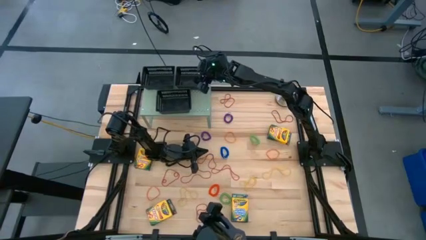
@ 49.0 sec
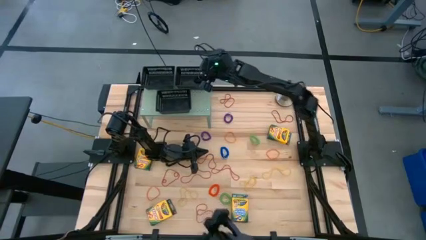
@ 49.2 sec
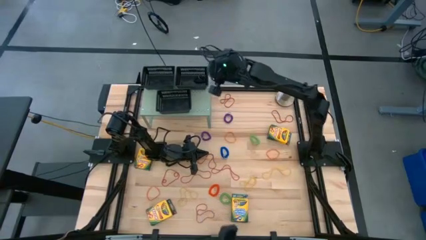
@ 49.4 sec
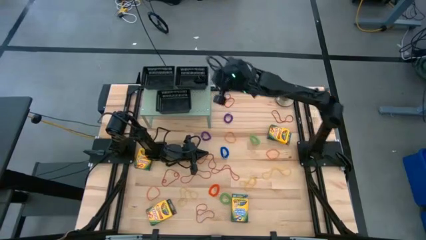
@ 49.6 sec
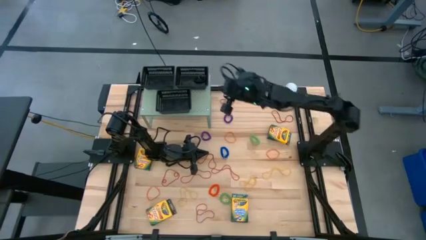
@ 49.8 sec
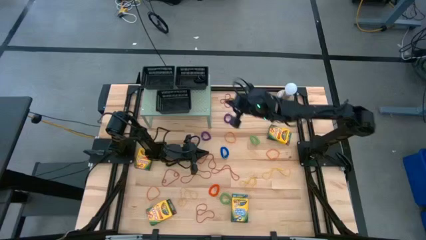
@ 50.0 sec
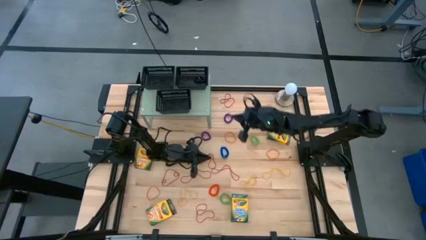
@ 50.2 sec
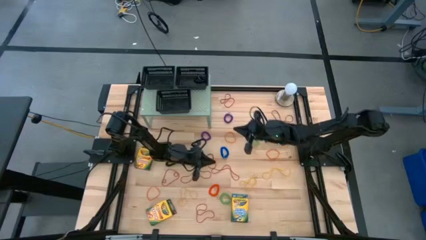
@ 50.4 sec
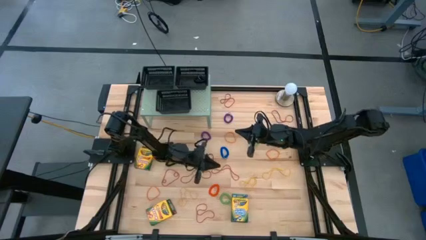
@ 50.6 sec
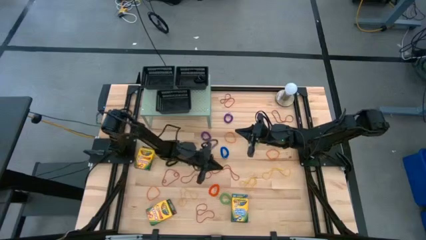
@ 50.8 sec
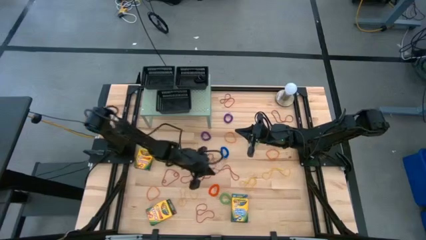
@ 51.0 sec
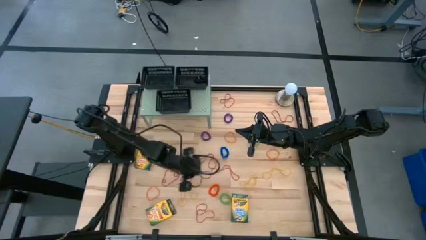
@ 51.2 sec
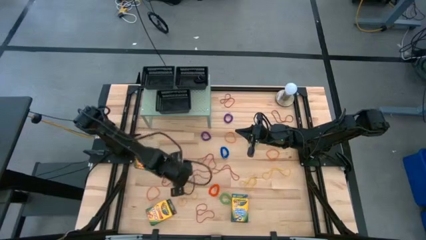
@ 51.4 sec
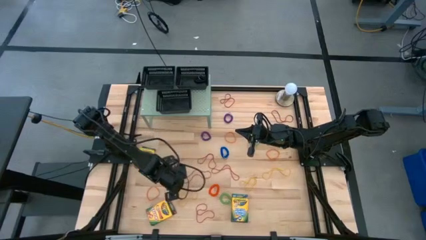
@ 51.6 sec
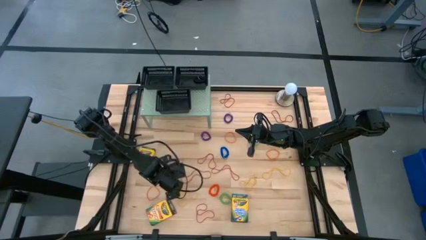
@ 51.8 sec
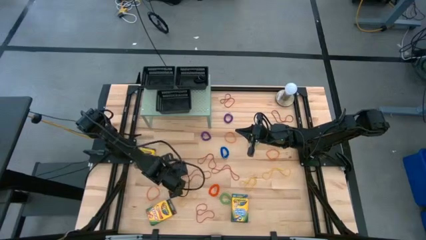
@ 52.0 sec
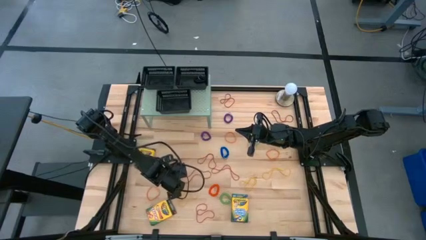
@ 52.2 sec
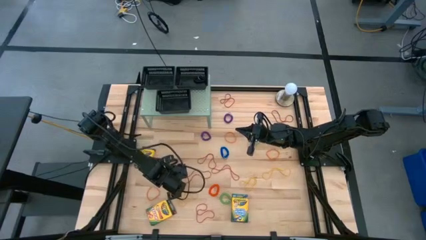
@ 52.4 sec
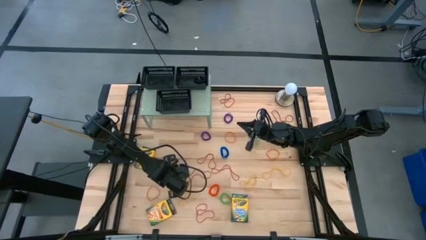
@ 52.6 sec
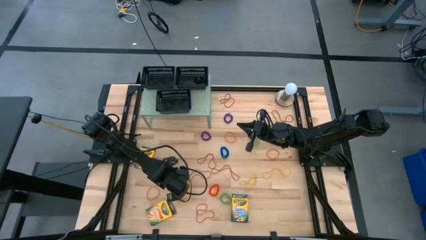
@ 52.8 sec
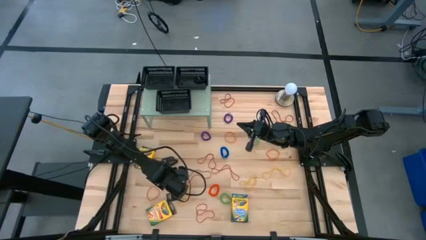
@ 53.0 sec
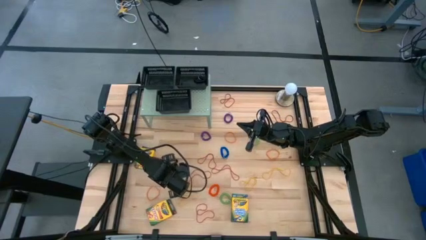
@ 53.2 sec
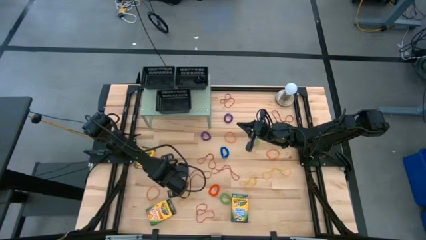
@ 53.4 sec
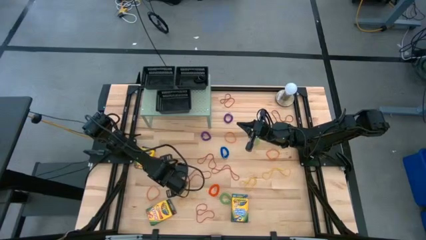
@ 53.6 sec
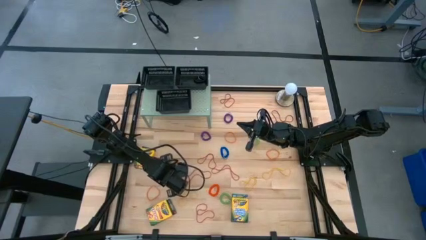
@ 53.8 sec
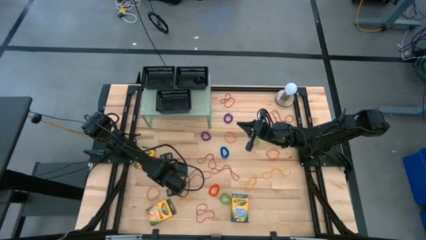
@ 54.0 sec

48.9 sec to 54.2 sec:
Task: Pick & Place Office Desk Supplies
Put the red rubber band into the top left black bin on the shelf

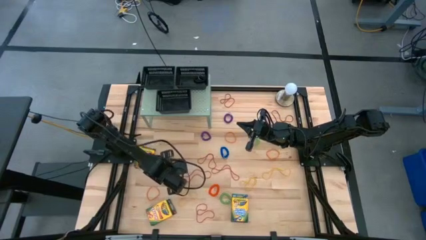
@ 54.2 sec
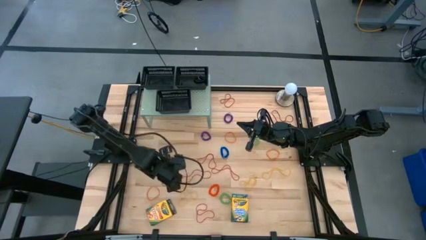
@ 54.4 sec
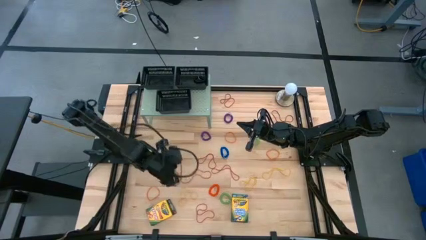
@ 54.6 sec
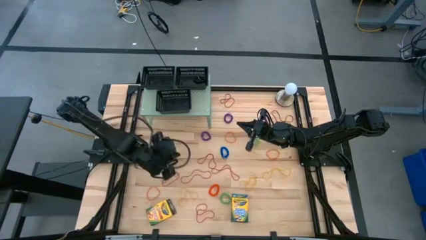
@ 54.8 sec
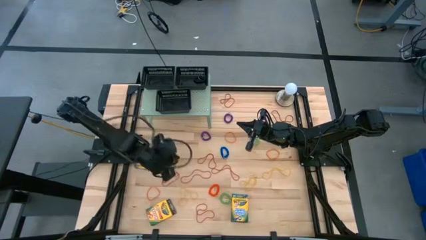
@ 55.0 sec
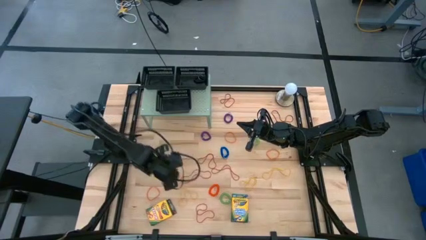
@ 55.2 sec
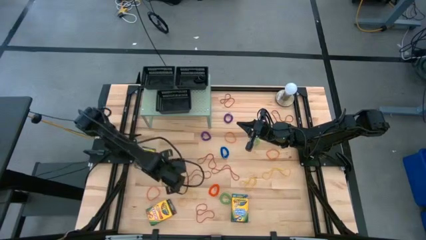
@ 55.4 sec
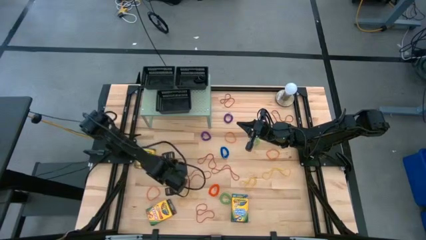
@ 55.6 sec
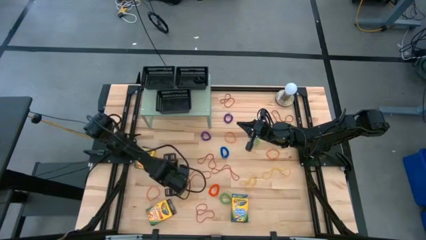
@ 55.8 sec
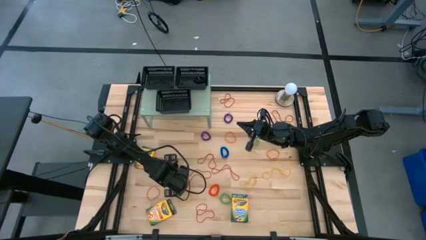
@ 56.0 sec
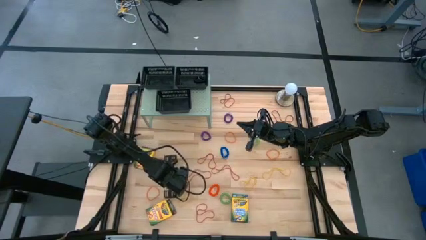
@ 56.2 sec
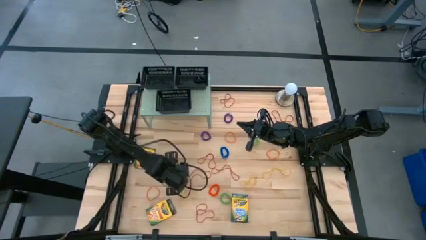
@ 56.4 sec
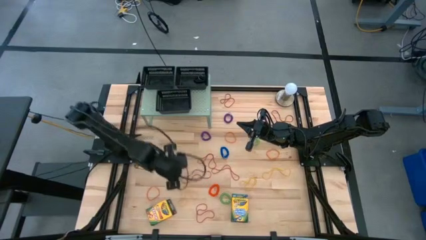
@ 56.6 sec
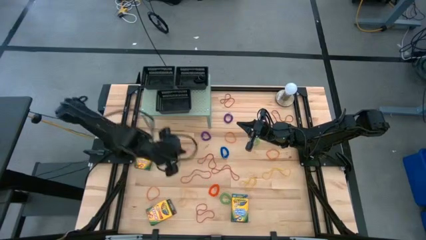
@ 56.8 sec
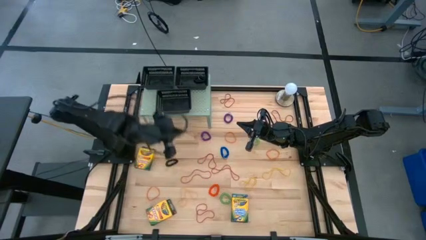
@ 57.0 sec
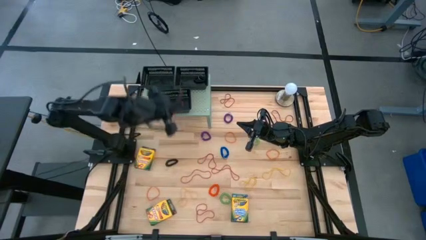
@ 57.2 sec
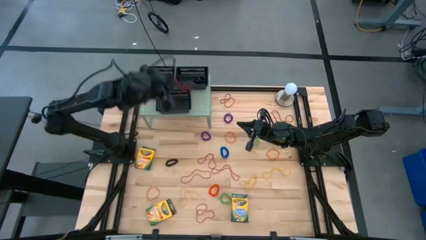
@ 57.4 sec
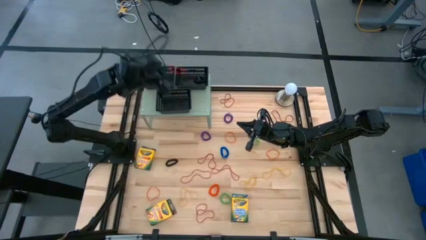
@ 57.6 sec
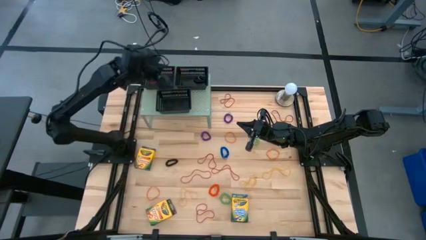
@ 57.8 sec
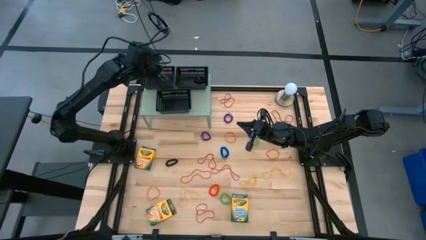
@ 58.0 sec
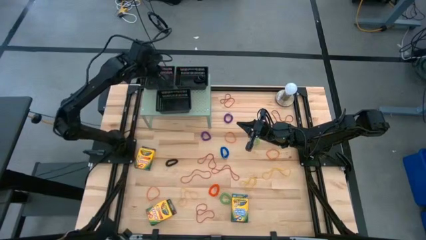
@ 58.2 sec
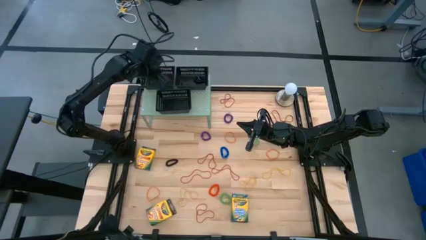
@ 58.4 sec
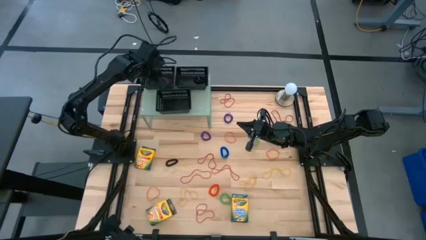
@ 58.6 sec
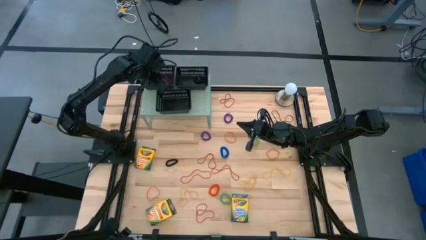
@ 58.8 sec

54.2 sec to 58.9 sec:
Put the red rubber band into the top left black bin on the shelf

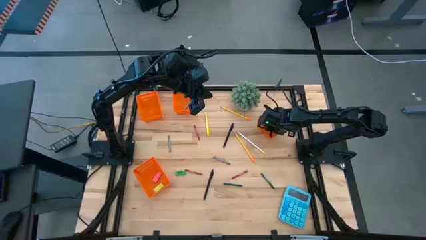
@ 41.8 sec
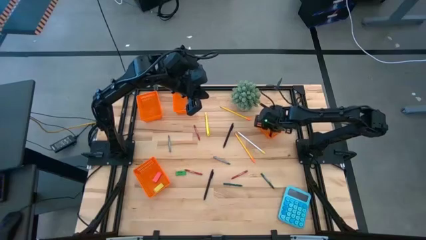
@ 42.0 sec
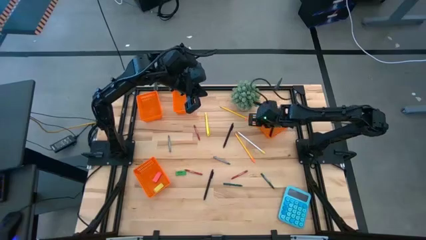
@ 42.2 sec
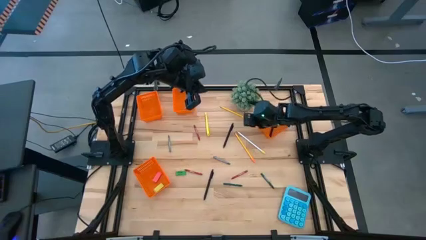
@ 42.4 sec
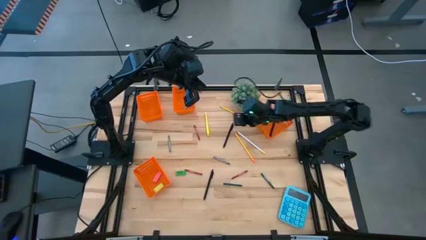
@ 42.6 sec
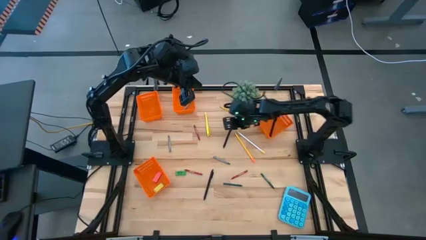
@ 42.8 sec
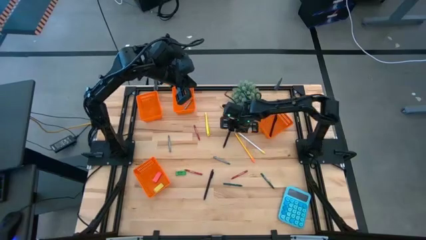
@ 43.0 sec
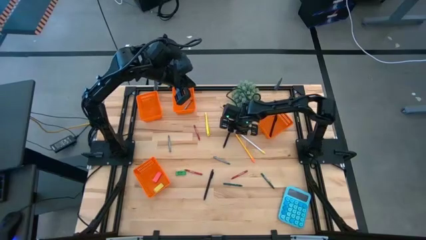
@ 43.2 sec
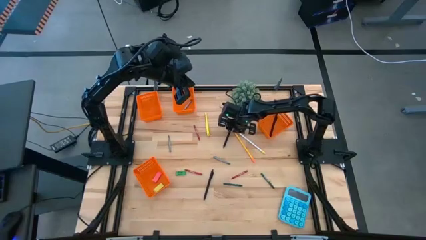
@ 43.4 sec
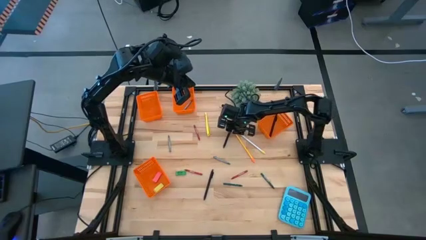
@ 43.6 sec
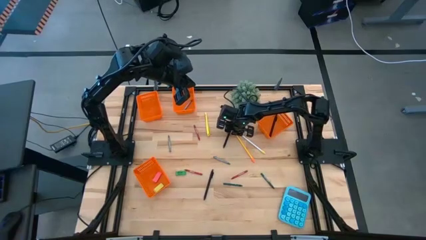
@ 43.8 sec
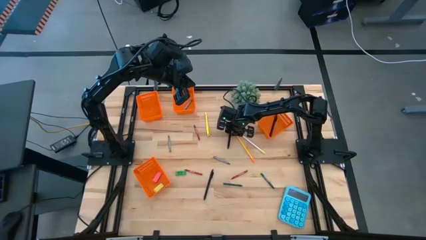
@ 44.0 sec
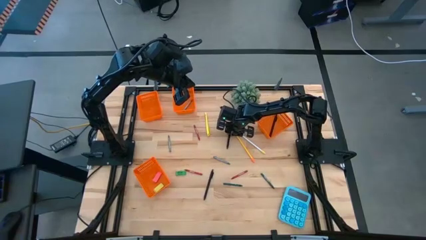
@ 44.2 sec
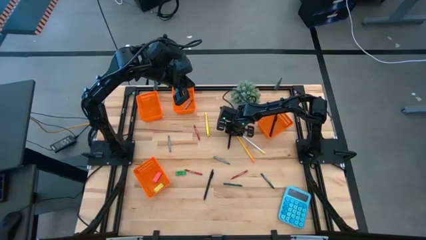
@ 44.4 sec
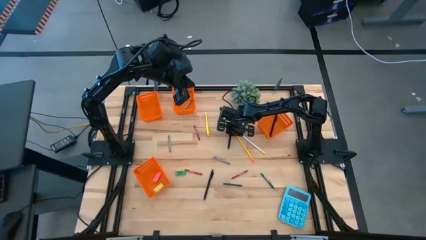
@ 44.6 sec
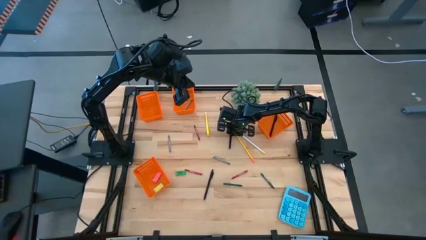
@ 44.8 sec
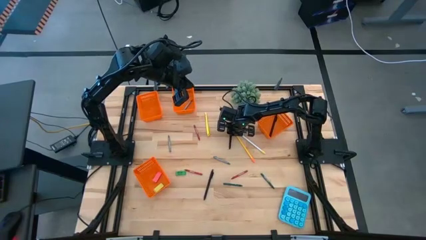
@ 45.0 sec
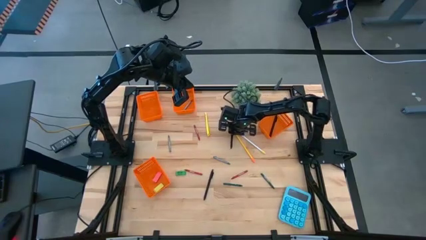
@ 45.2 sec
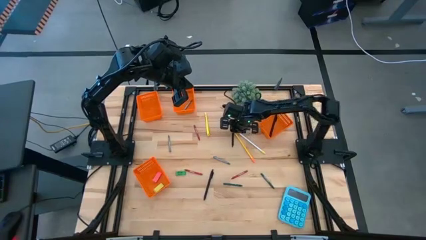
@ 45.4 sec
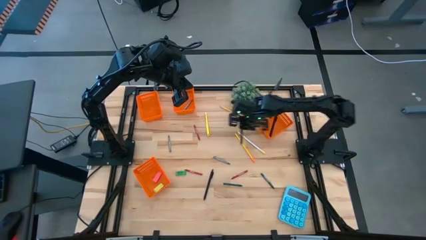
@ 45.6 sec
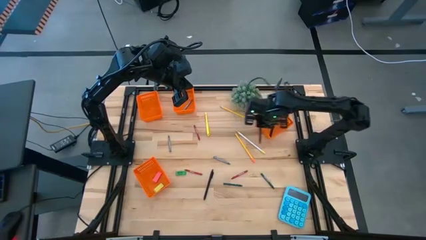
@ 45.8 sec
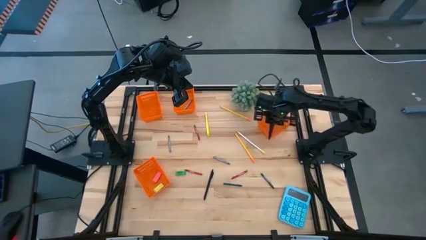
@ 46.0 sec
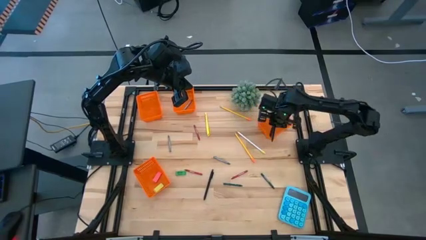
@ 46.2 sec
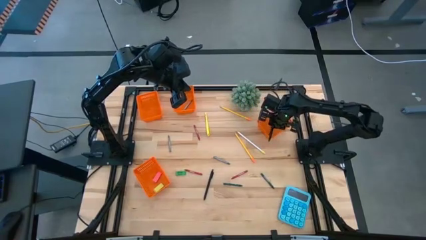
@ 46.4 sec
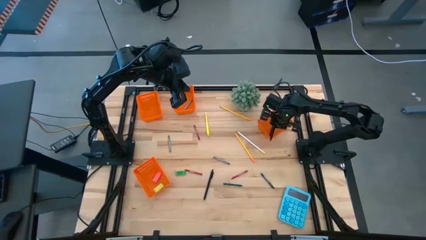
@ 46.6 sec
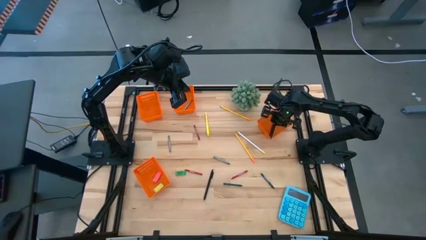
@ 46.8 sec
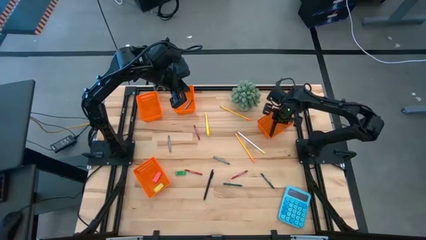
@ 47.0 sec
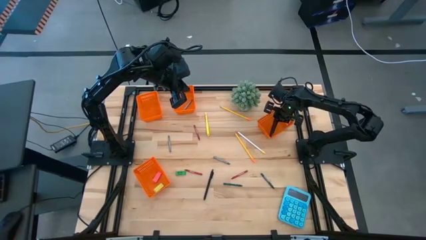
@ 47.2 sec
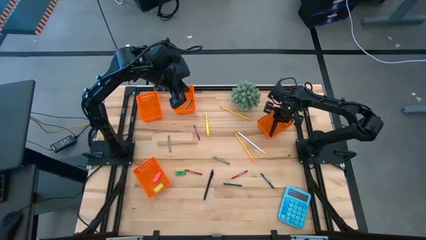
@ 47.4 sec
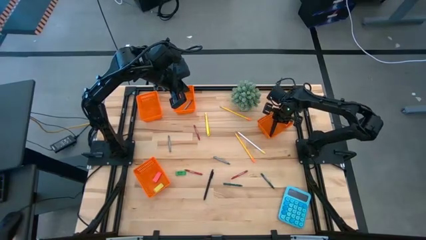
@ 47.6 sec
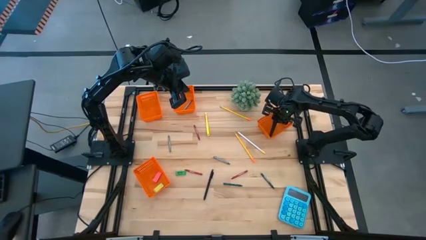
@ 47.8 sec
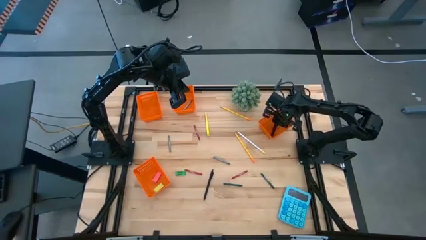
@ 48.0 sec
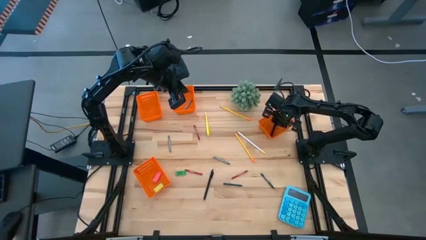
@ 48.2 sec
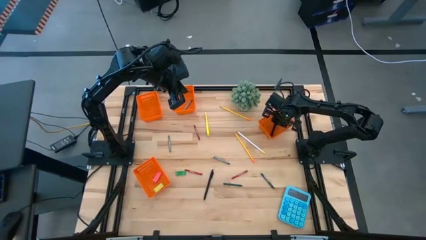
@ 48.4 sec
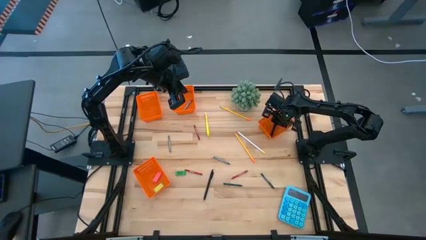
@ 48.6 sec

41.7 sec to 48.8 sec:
Task: Sort crayons/erasers/pens/pencils in bins
Put the top black pen into the right orange bin
